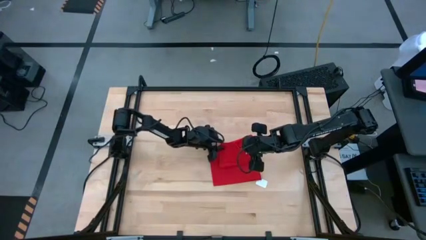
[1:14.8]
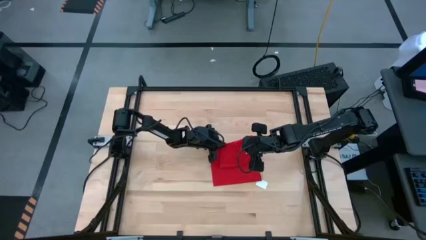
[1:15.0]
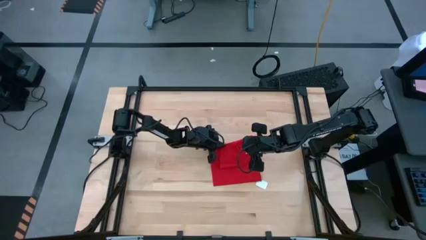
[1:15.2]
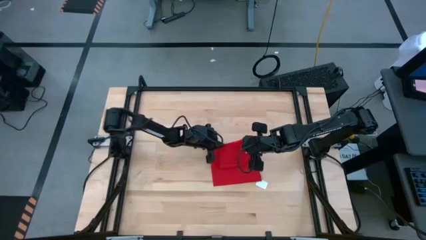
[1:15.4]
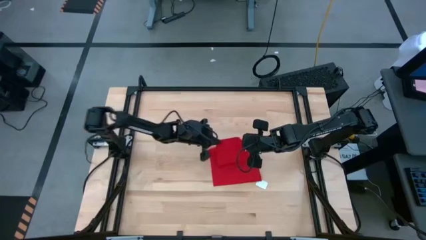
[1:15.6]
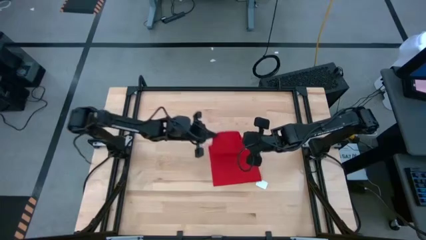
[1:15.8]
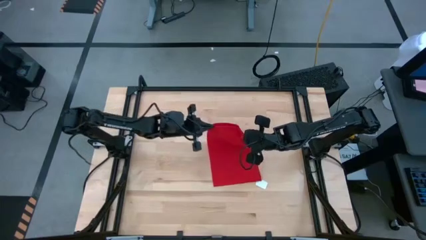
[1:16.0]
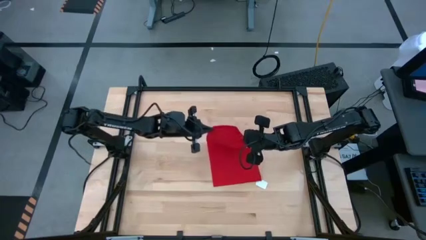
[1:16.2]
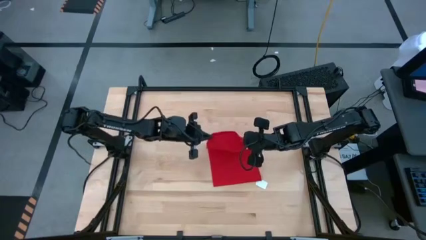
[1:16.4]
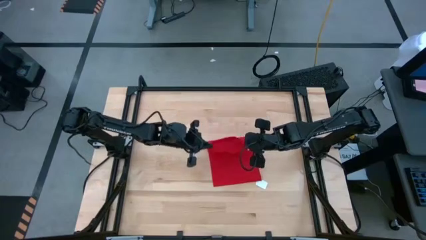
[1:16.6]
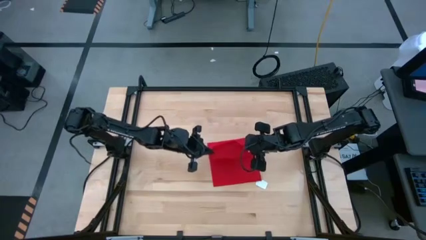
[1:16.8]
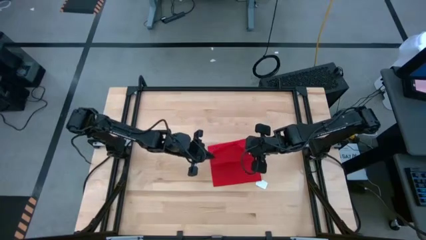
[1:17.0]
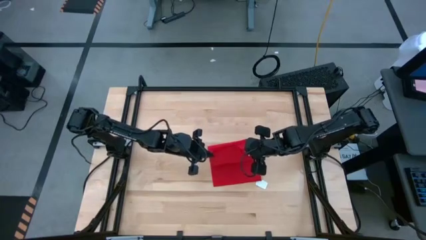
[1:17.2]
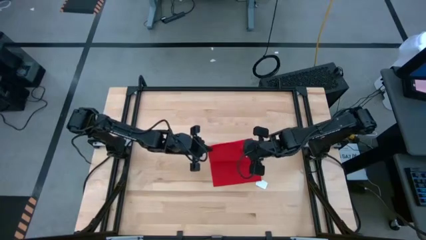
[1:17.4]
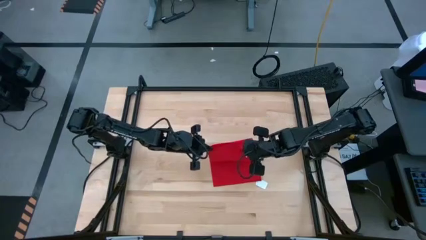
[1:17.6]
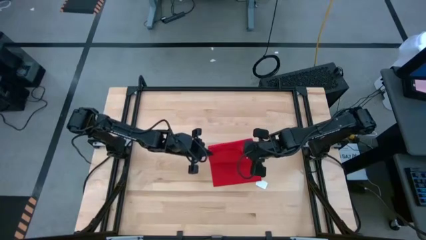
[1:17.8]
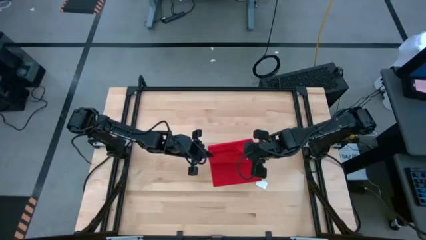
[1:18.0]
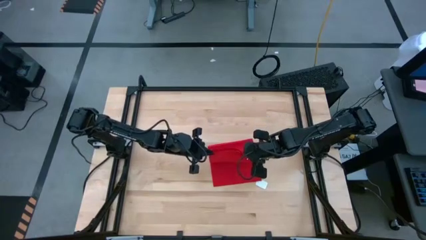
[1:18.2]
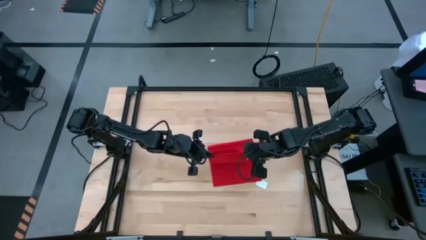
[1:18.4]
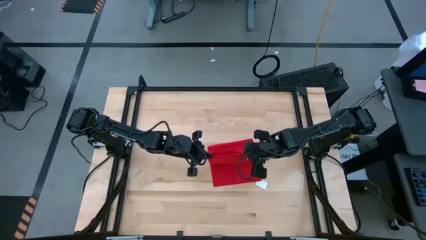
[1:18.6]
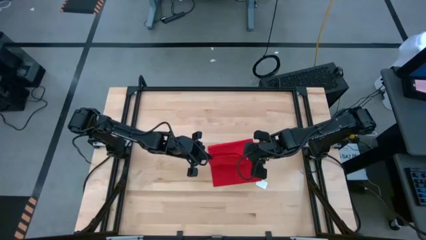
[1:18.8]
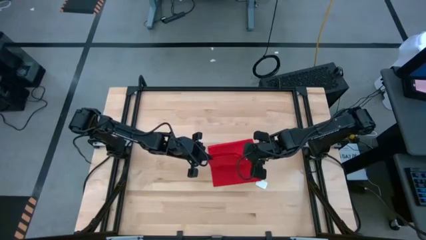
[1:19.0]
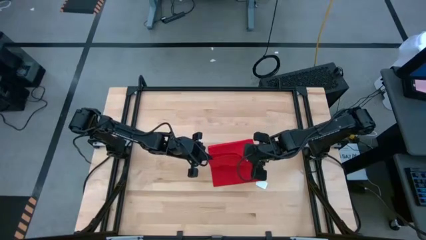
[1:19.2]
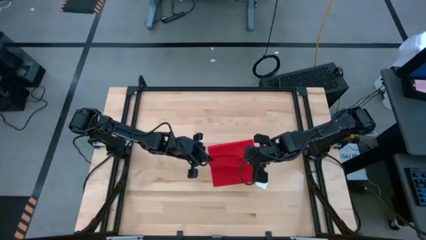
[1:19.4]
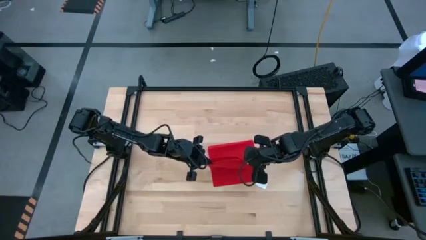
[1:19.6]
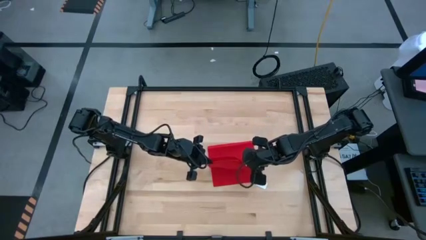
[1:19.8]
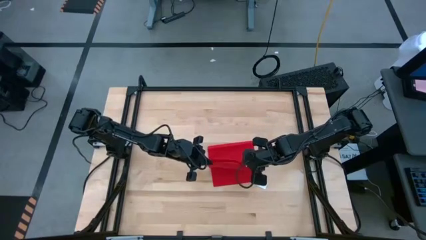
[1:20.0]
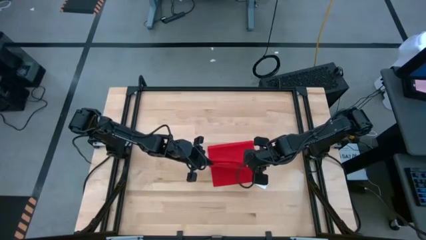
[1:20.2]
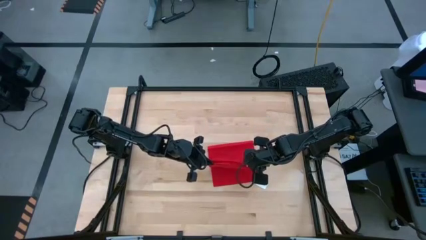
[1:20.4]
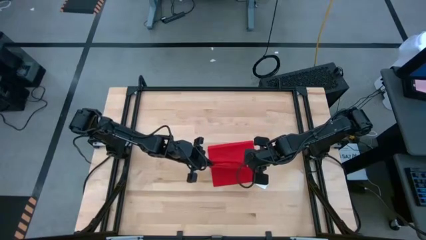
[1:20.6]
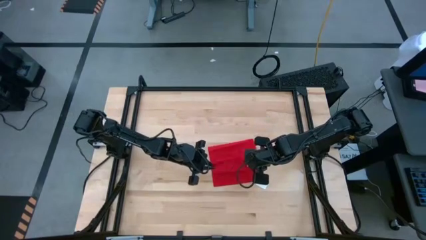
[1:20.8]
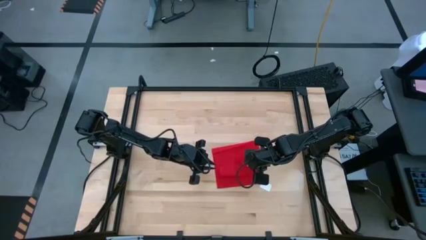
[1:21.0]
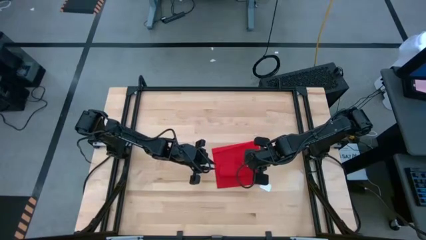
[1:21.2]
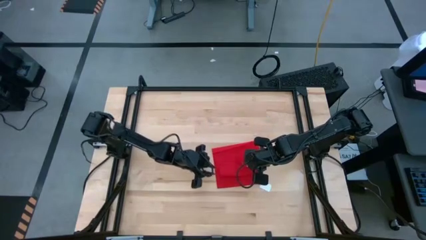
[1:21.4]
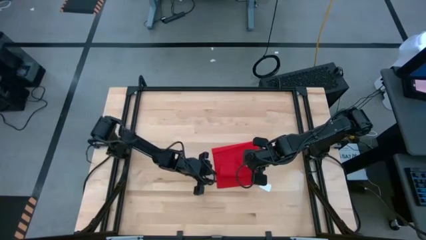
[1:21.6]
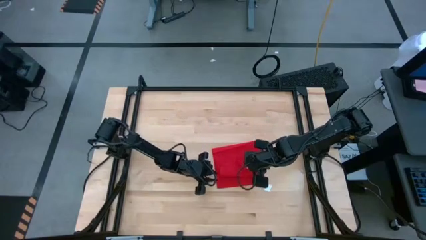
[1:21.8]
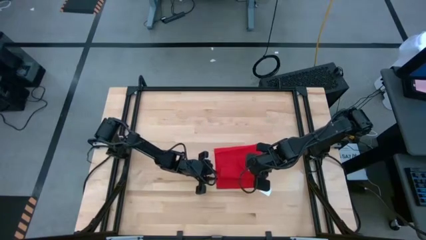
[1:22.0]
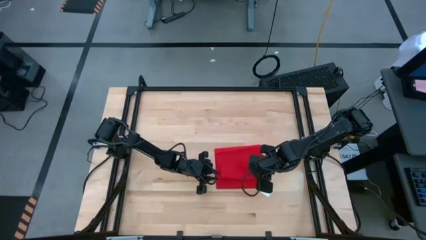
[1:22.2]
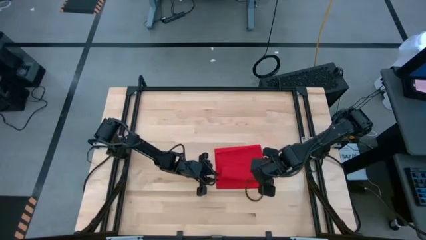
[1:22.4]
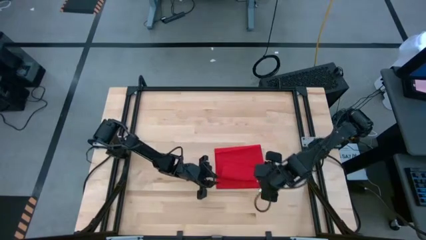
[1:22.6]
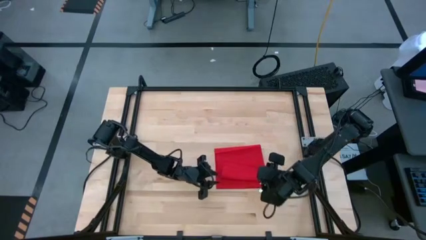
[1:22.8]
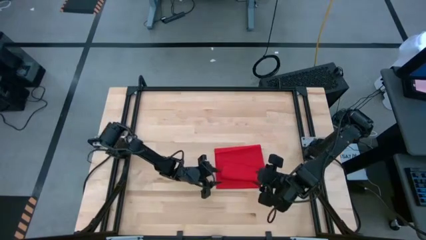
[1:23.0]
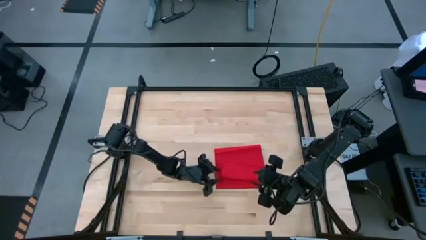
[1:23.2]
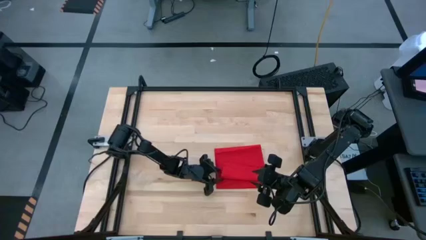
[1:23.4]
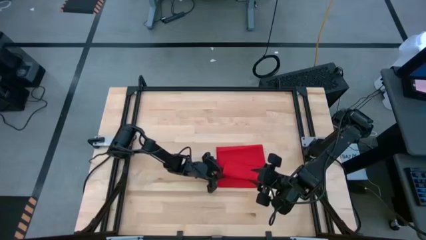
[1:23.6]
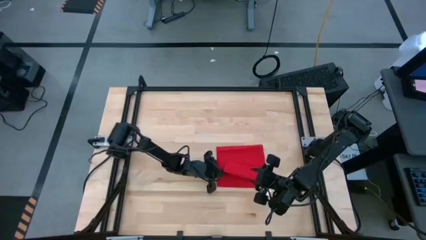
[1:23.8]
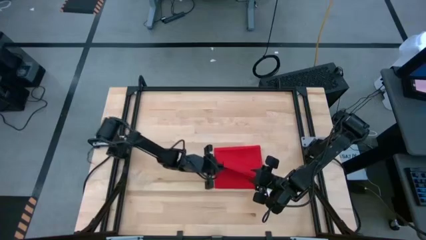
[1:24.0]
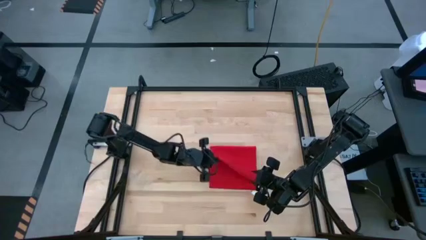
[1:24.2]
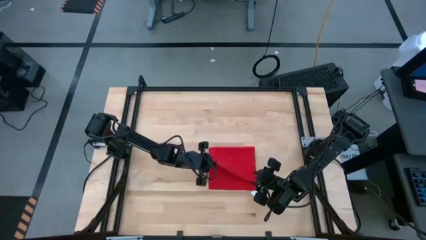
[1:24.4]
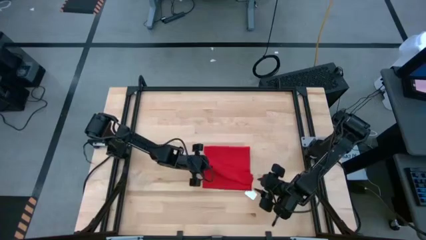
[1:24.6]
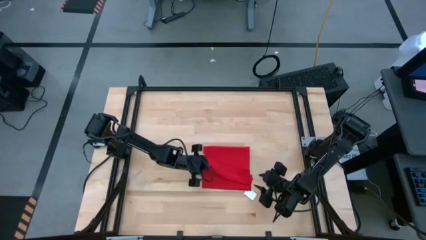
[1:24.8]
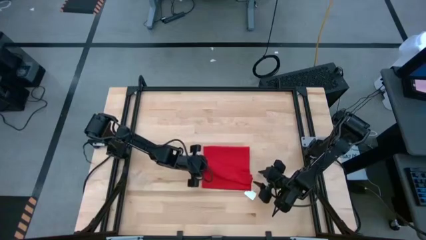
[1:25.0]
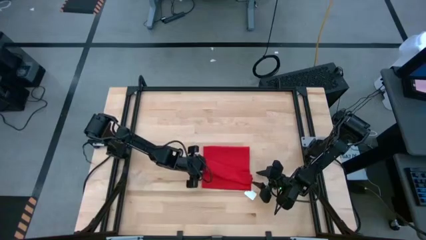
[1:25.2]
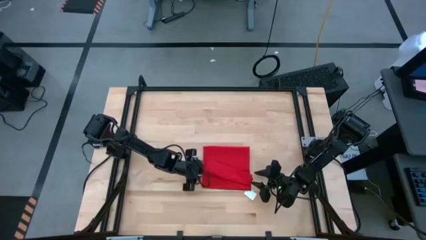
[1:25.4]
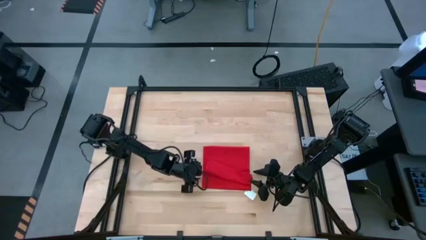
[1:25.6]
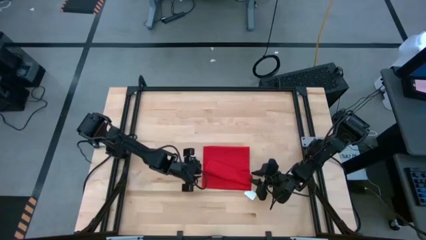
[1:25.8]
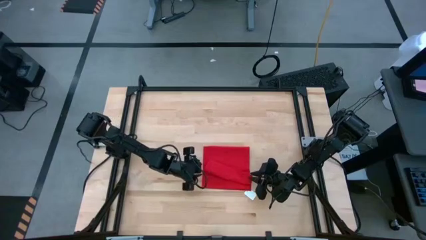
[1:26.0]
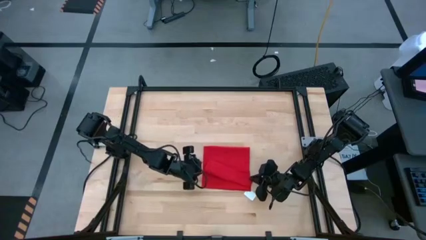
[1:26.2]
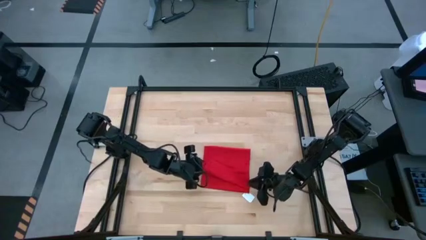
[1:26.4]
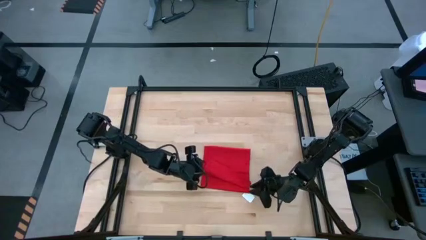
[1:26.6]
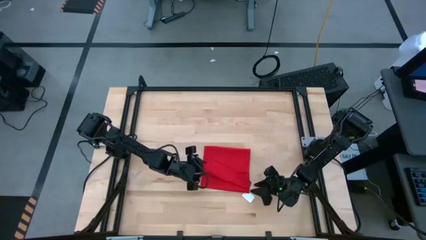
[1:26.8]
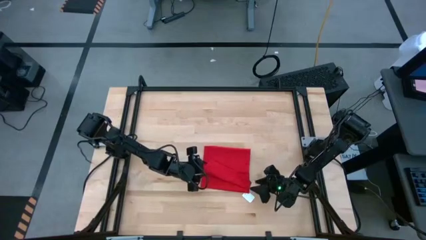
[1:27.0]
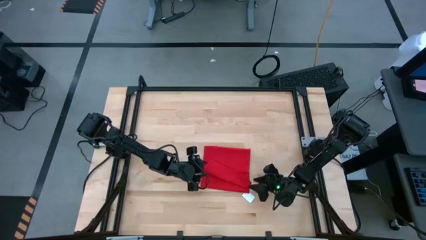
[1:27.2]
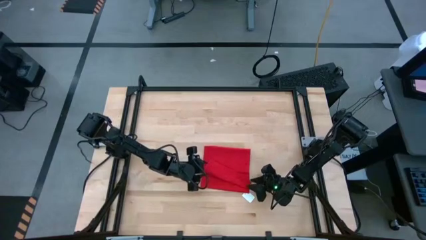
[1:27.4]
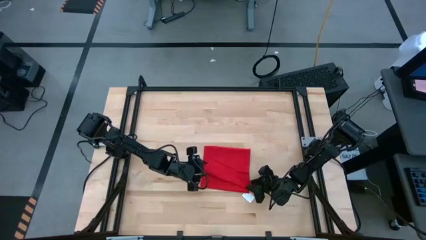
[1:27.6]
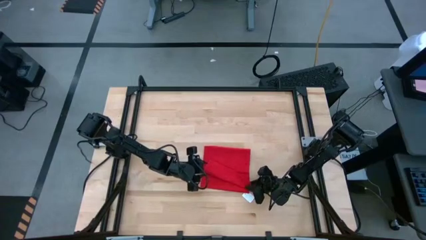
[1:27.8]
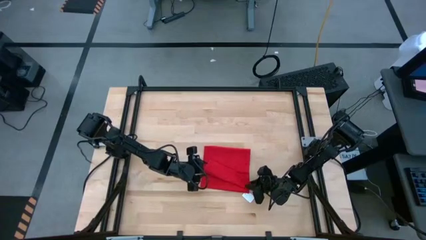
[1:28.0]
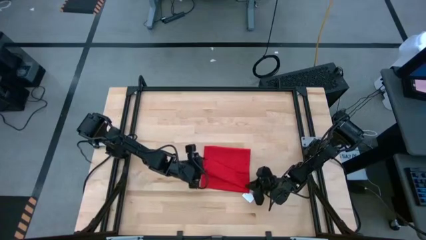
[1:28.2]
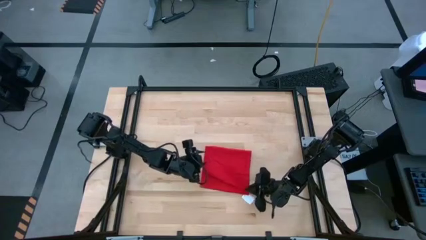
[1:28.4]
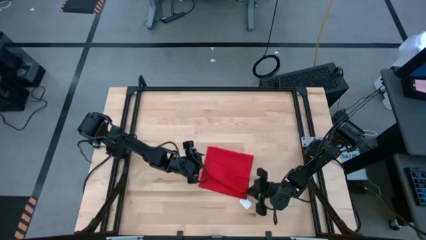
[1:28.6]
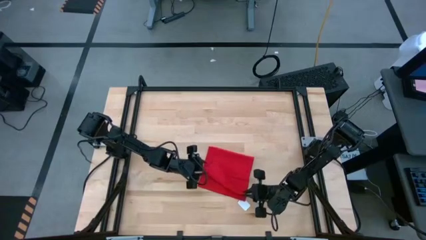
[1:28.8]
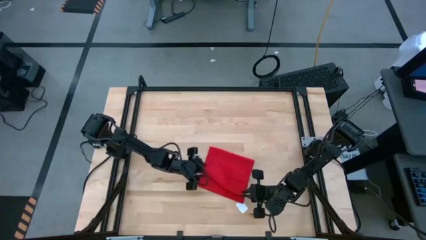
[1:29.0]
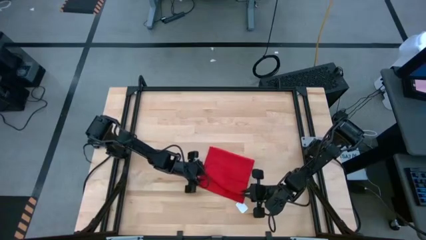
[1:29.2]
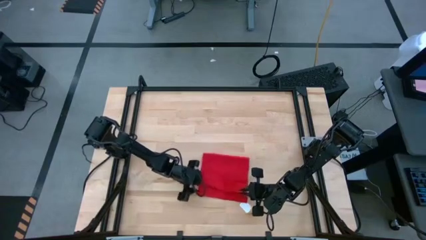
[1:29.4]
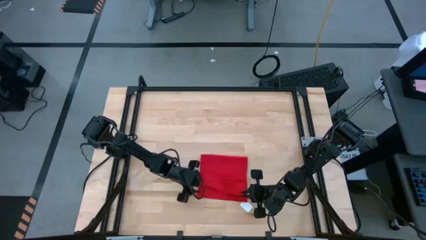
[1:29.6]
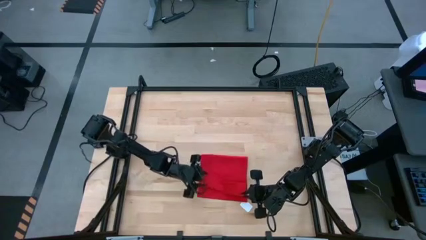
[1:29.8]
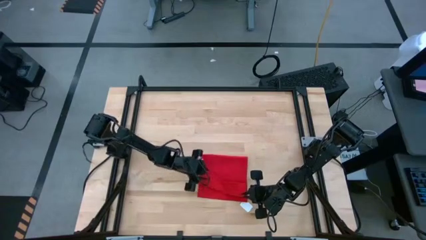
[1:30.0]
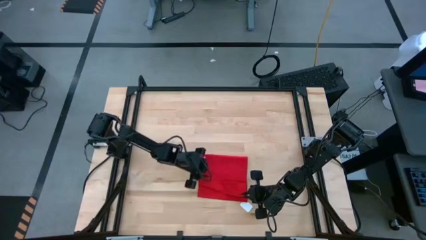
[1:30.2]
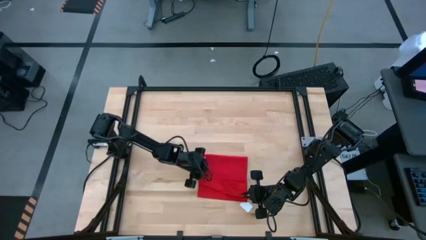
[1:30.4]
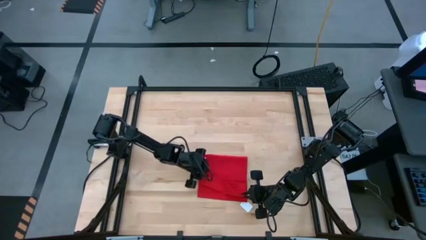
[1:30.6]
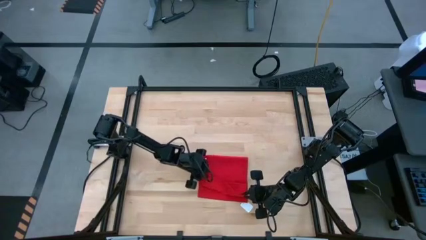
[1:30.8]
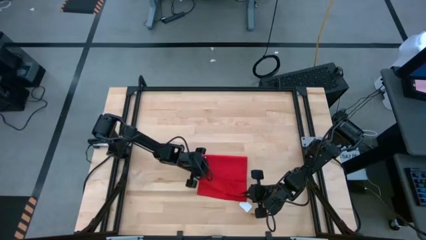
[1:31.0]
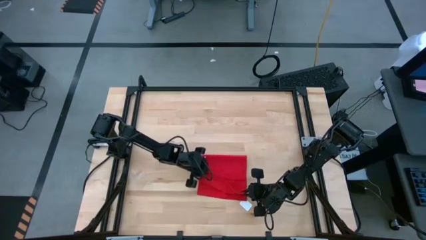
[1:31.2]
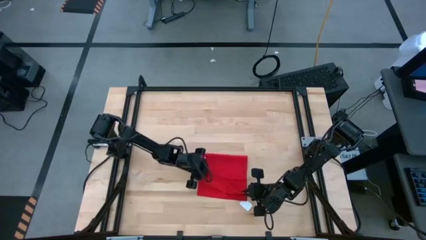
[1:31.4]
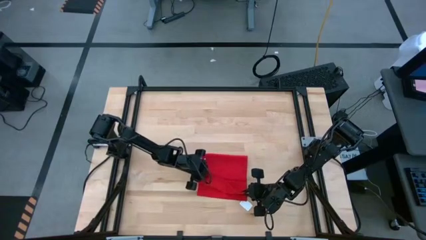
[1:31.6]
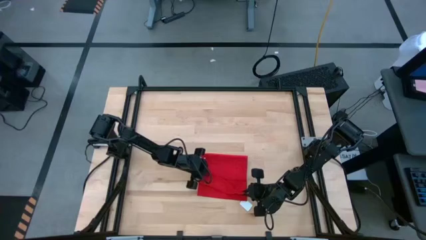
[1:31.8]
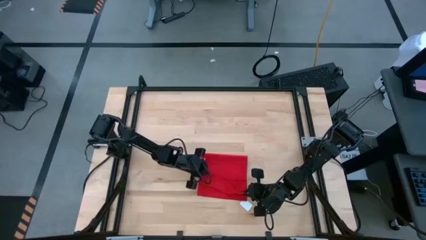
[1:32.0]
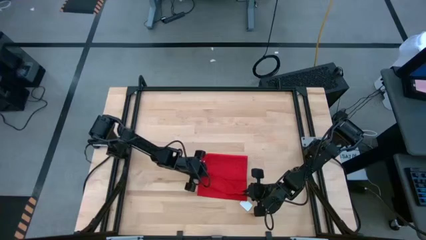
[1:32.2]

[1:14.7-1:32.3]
Task: Roll napkin
Fold the red napkin
